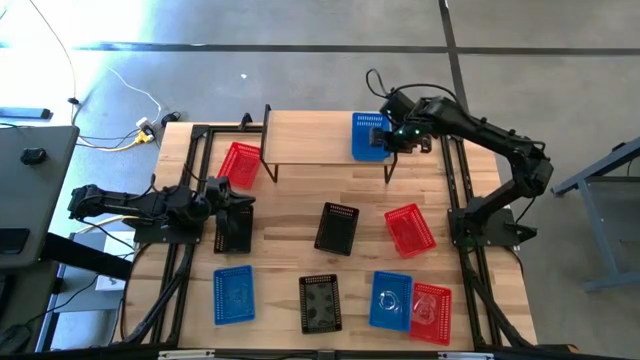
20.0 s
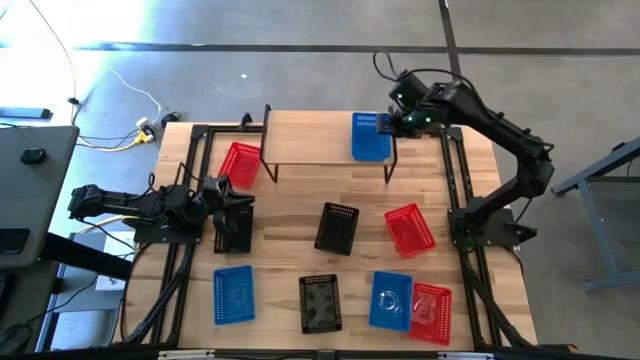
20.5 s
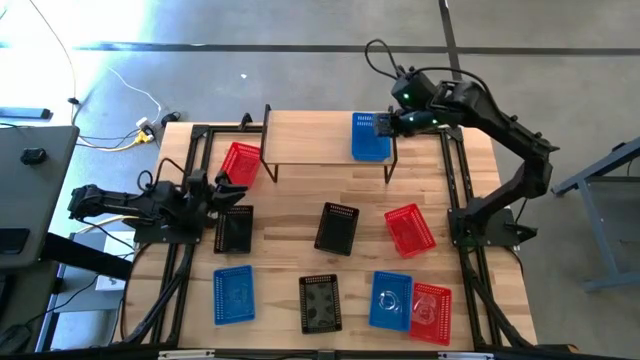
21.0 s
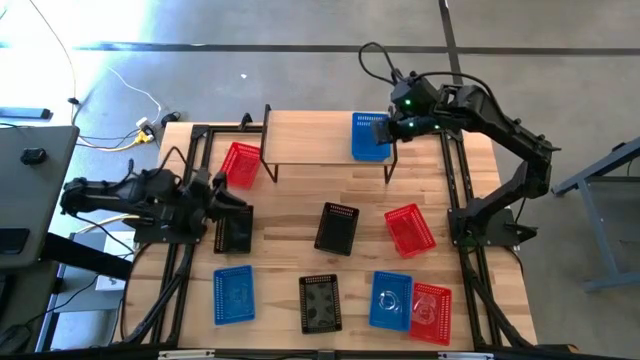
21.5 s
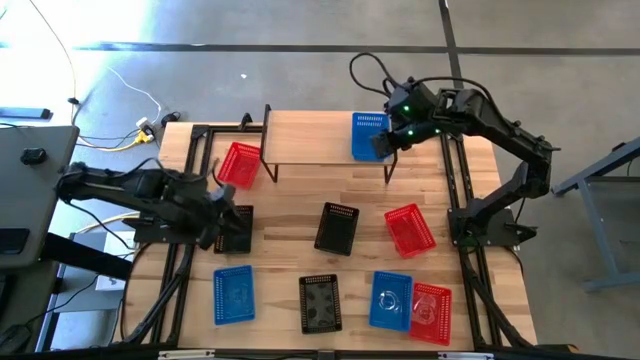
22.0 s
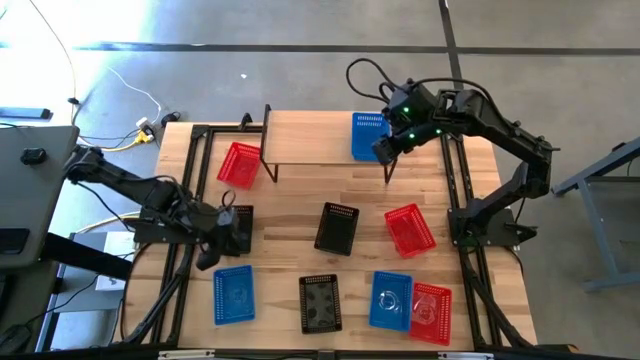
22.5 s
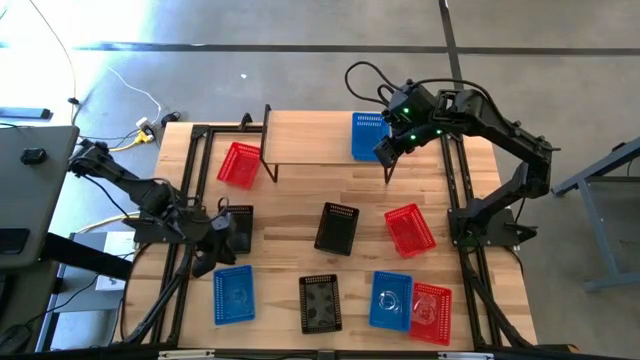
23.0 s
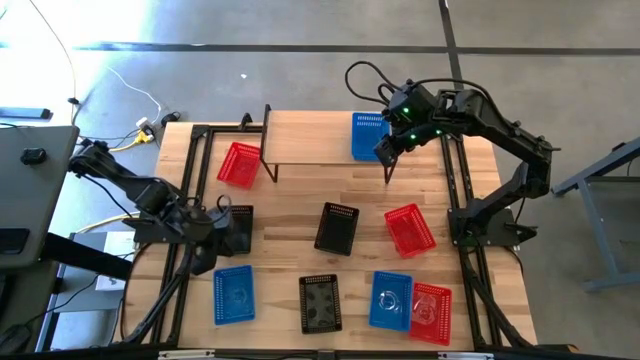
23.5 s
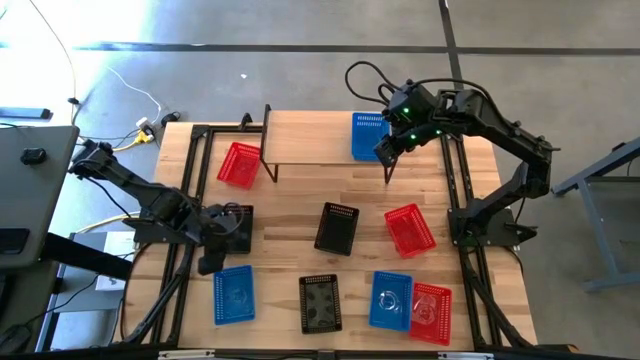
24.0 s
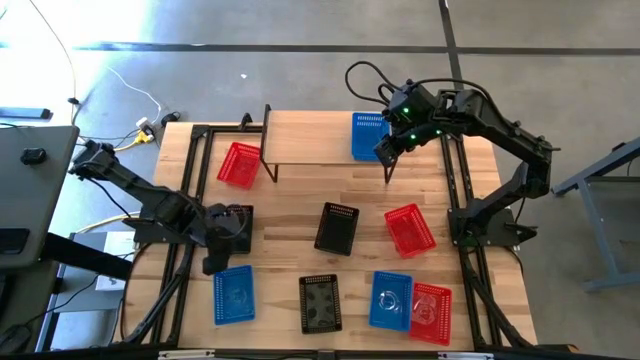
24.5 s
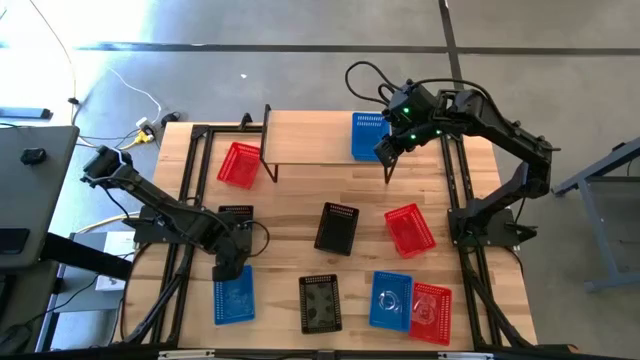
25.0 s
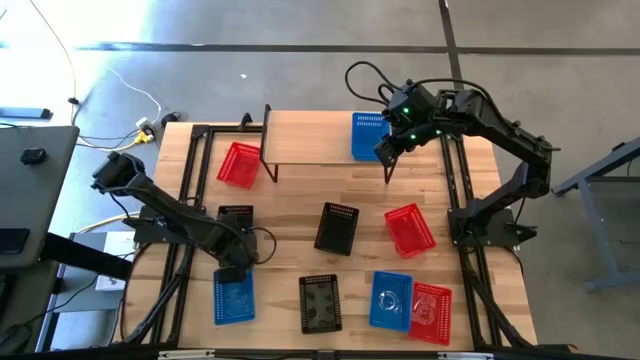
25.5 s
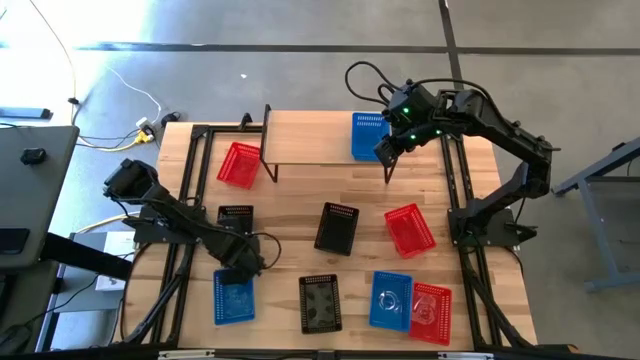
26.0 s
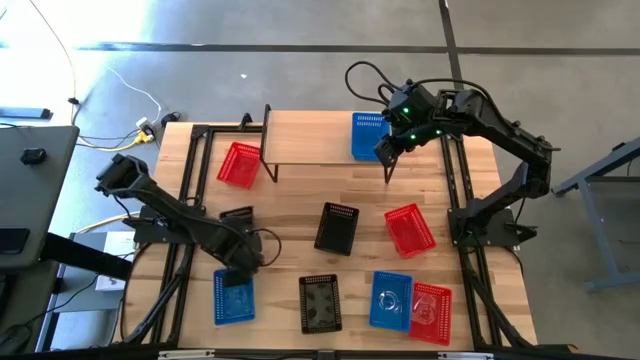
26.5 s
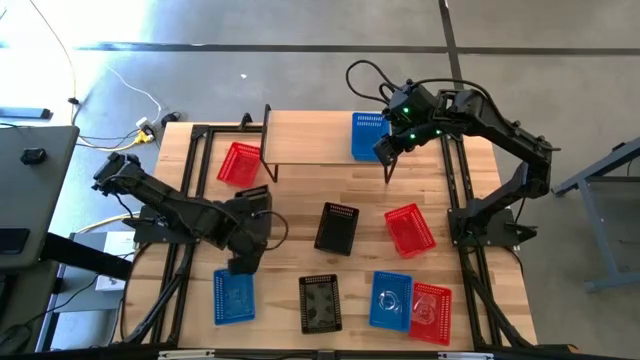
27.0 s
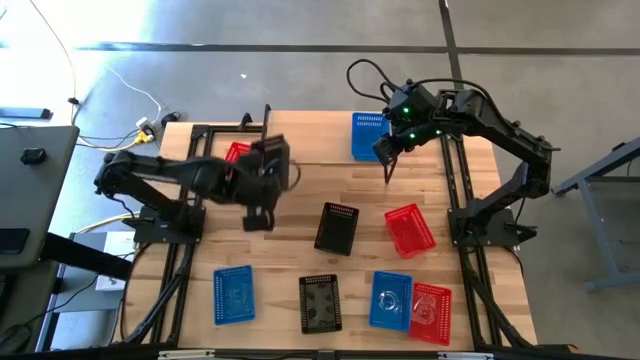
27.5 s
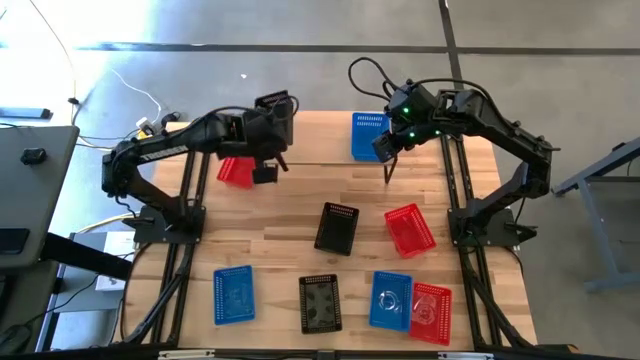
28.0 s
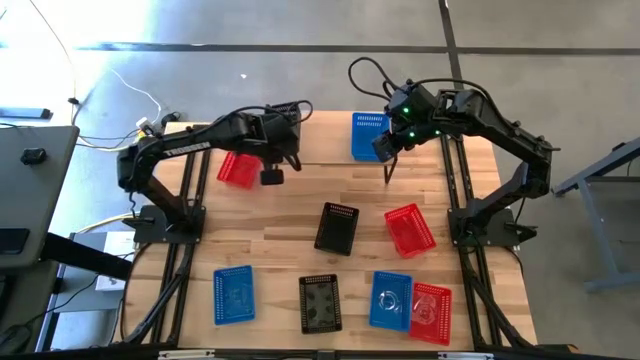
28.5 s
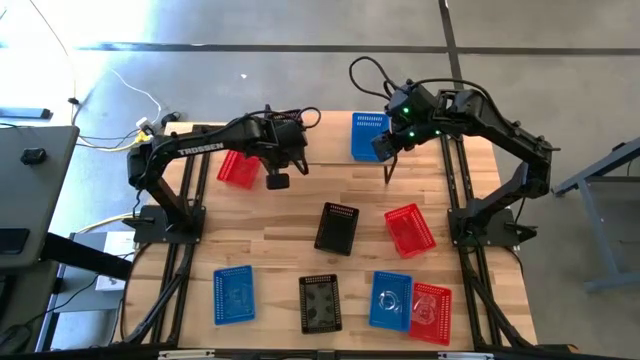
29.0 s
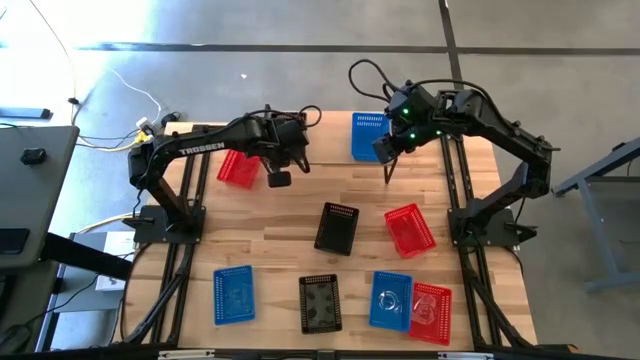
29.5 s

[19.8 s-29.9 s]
Task: Stack baskets on shelf by color
Put the top left black bin on the shelf

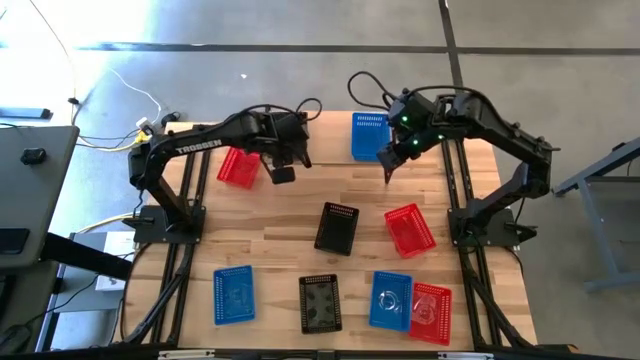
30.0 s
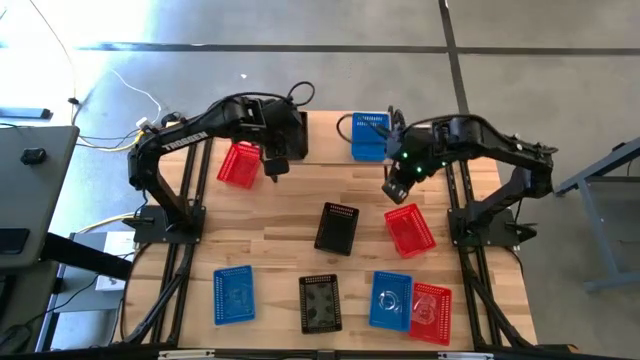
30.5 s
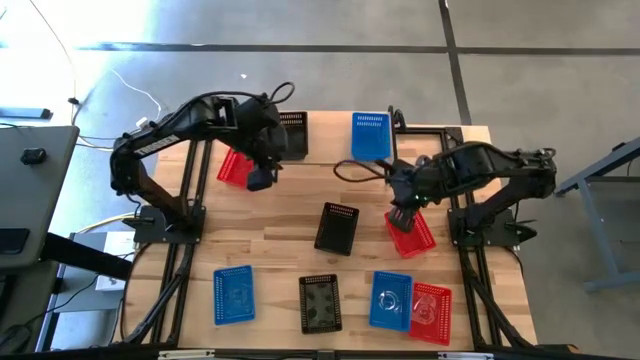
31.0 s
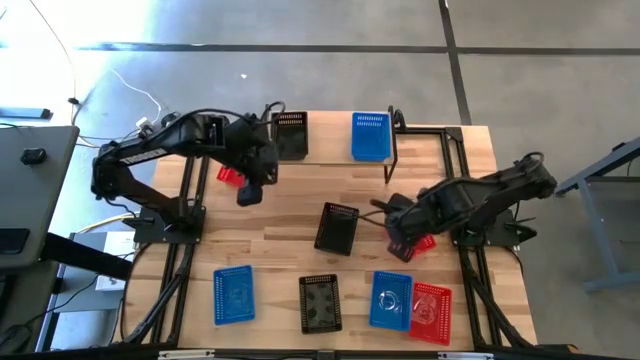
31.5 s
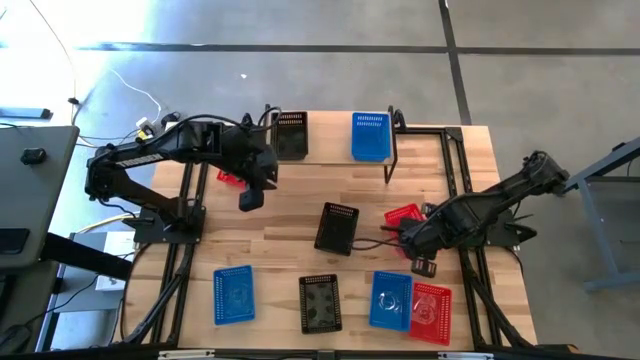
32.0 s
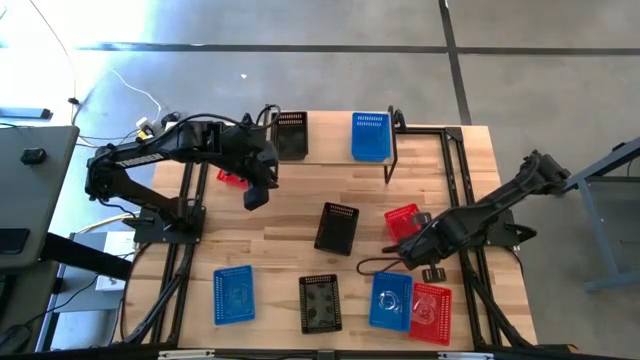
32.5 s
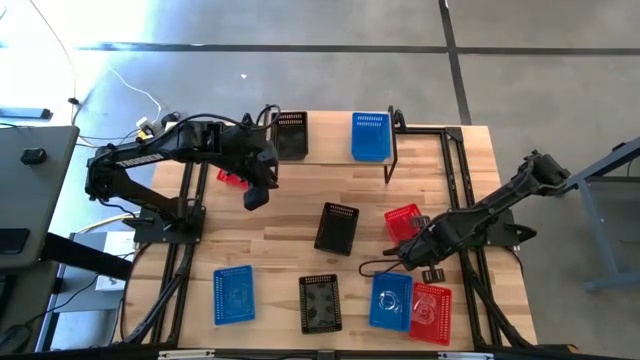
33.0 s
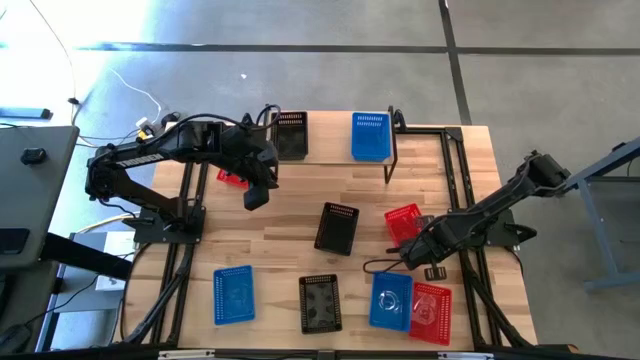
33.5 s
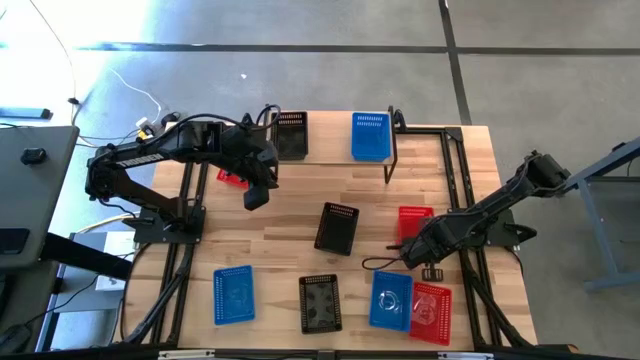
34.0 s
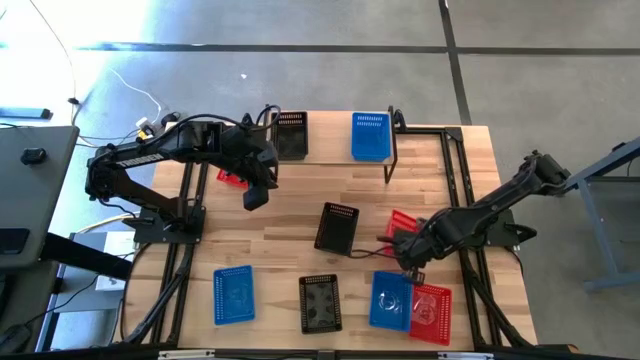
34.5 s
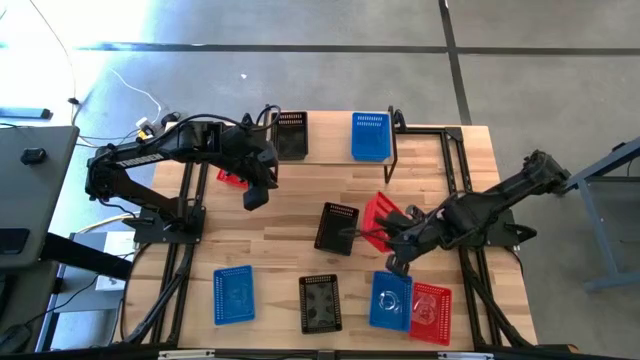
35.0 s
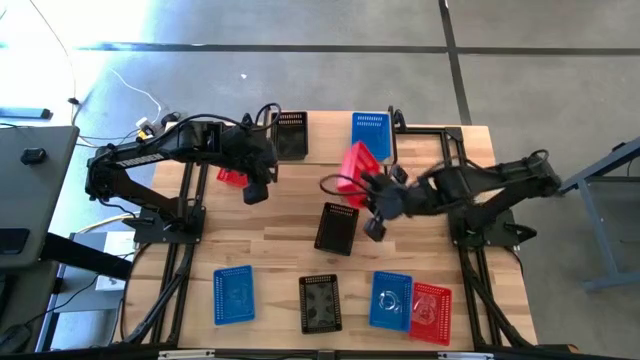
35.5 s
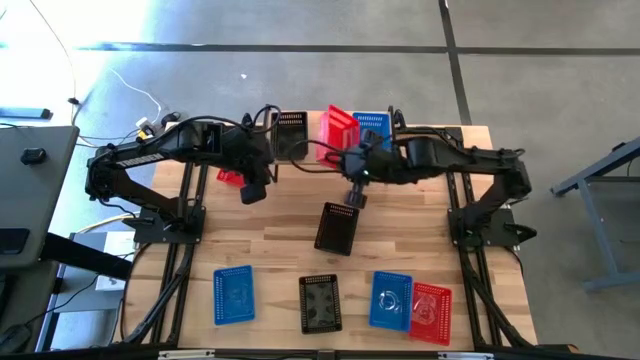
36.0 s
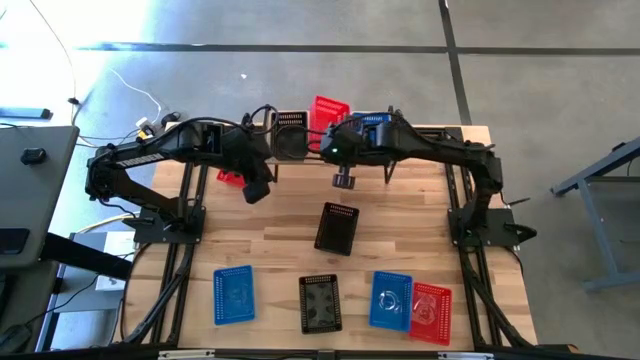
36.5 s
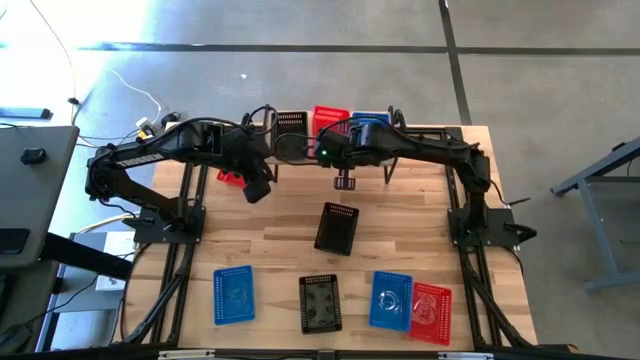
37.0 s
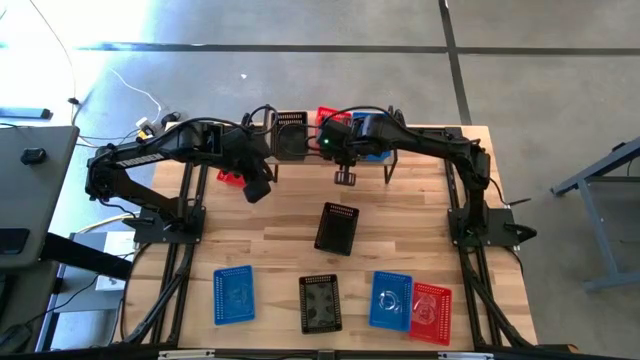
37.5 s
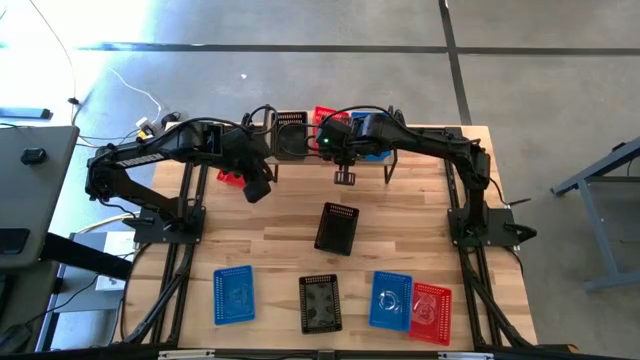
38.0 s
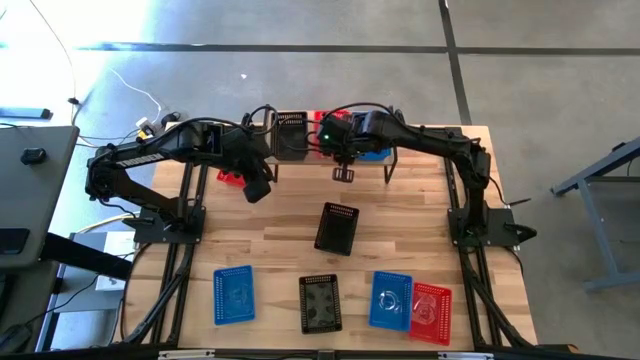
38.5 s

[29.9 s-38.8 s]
Put the middle red bin on the shelf

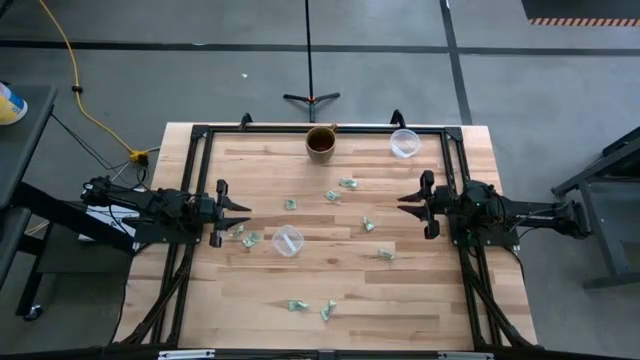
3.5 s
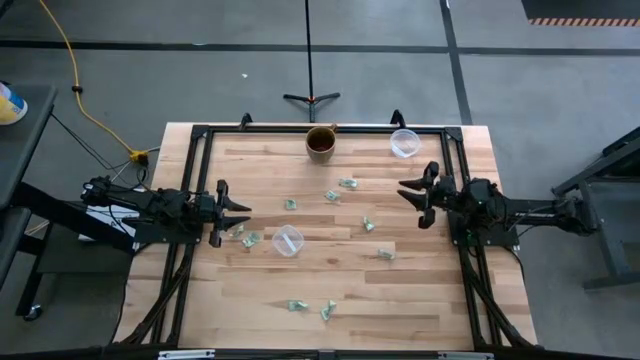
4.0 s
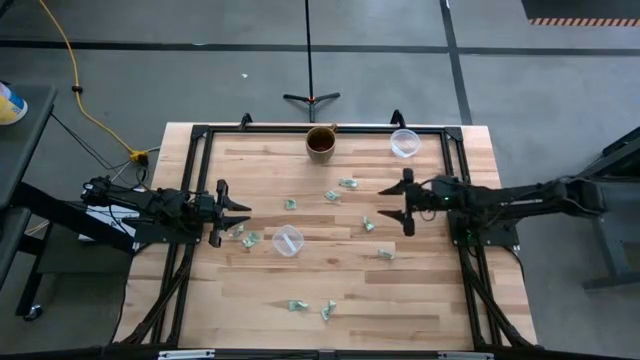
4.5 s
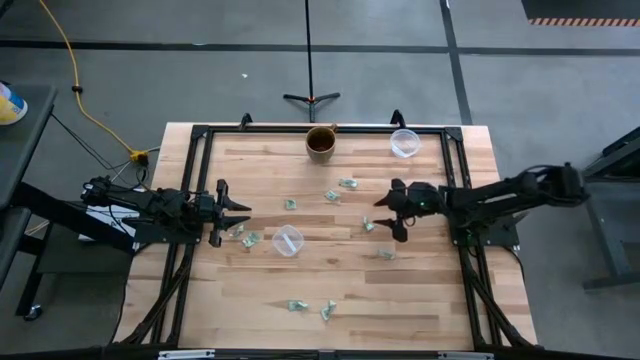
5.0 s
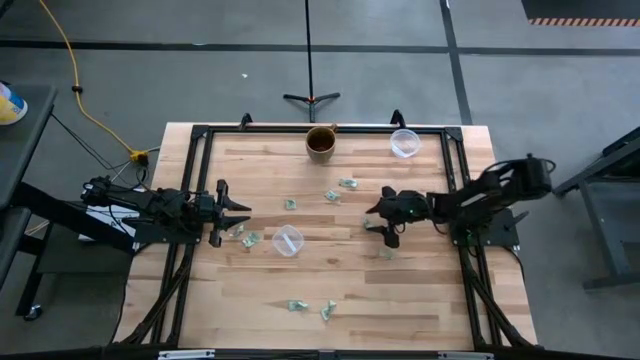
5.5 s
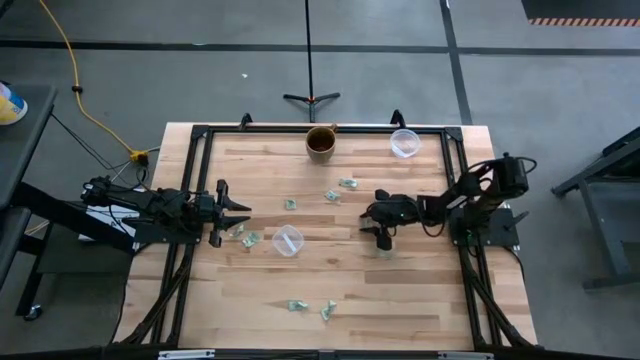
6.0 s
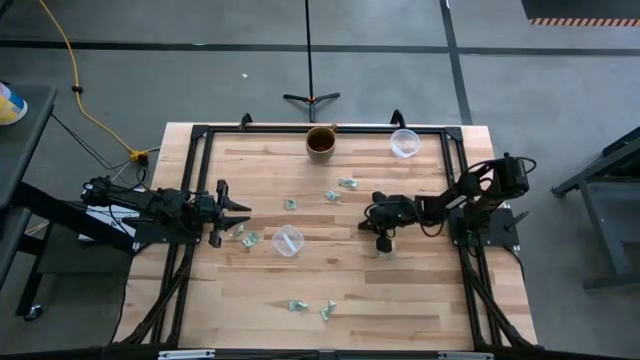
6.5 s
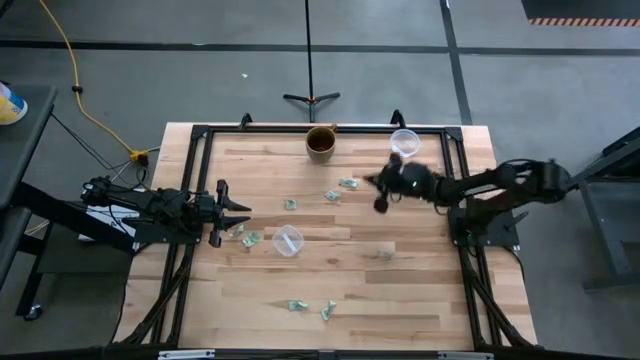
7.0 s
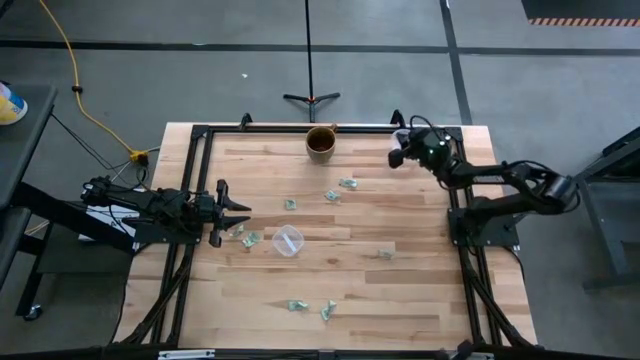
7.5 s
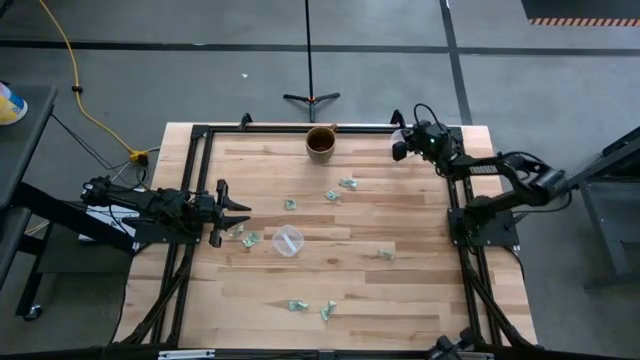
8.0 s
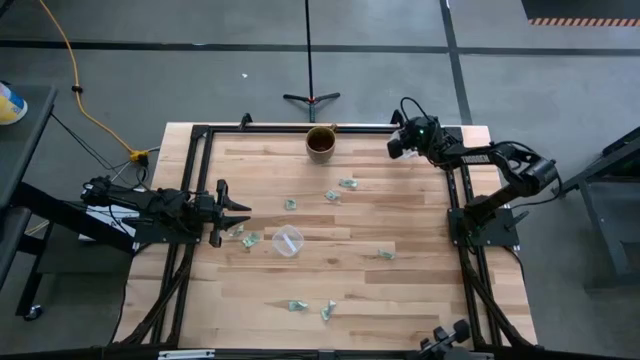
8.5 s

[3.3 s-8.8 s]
Task: Pick and place items into bin
Put the stevia packet into the top transparent bin
